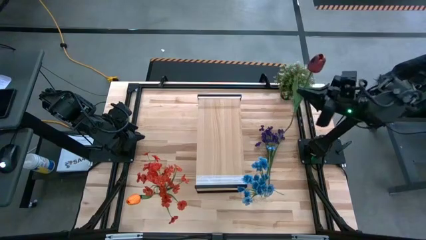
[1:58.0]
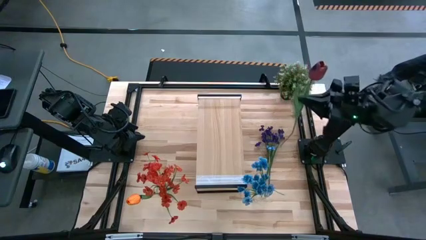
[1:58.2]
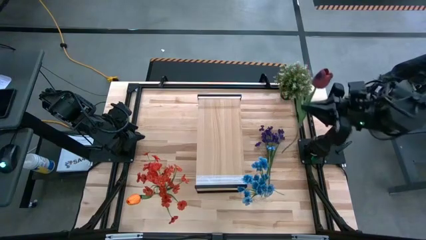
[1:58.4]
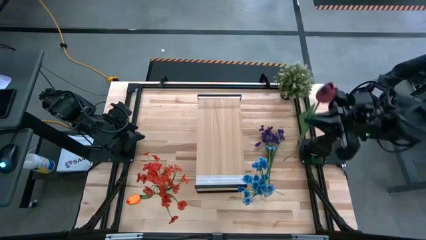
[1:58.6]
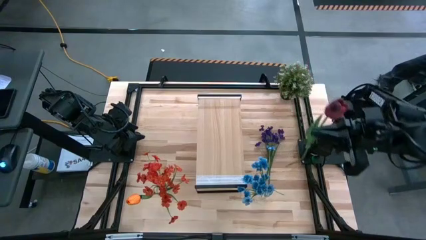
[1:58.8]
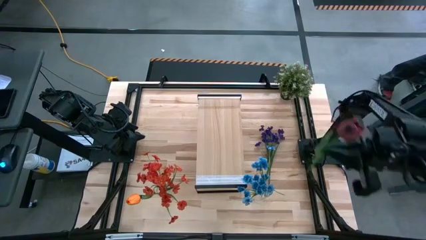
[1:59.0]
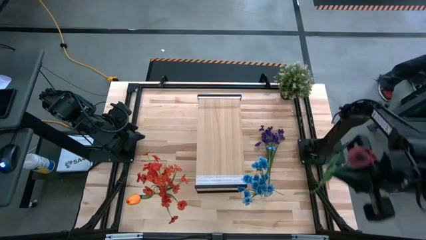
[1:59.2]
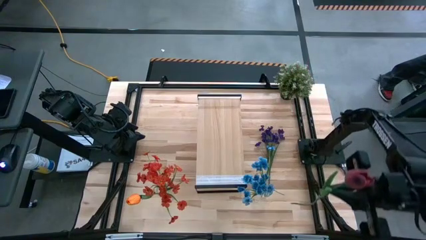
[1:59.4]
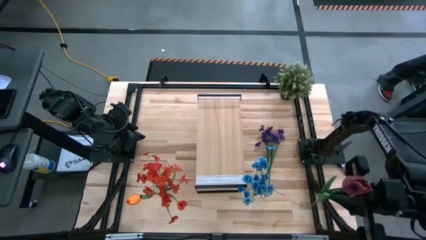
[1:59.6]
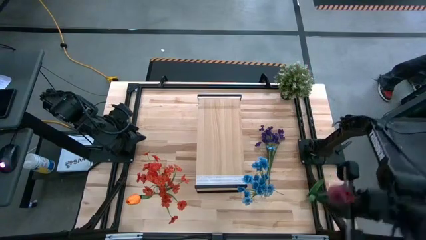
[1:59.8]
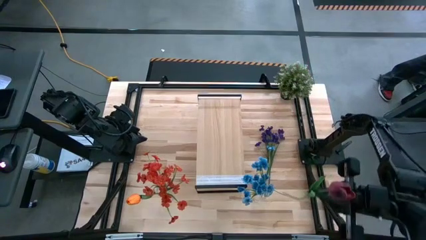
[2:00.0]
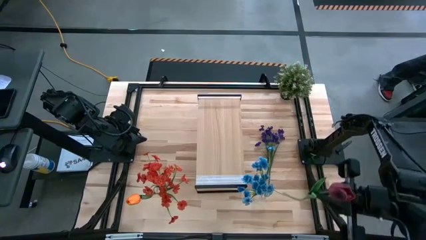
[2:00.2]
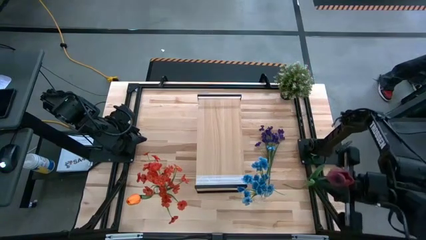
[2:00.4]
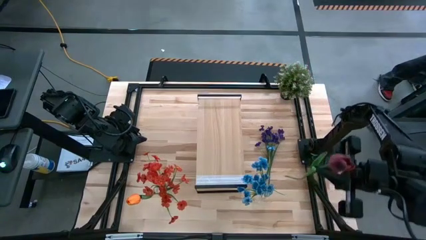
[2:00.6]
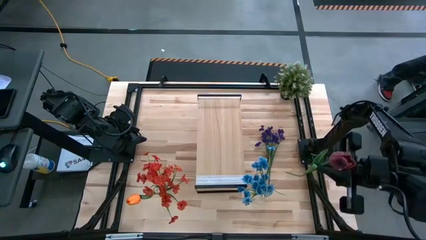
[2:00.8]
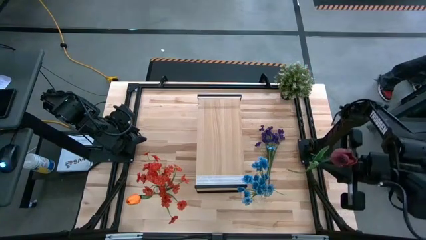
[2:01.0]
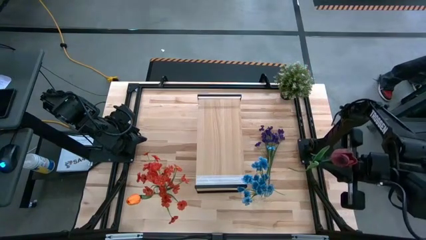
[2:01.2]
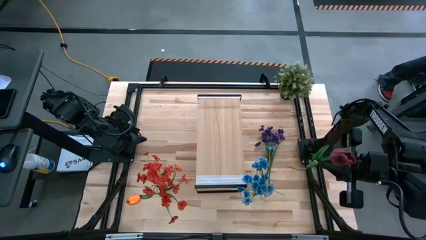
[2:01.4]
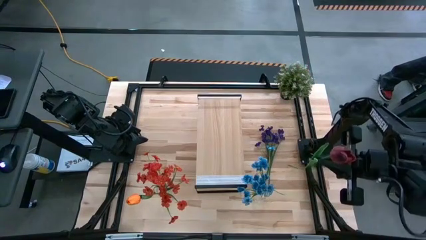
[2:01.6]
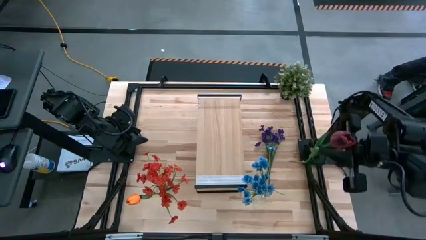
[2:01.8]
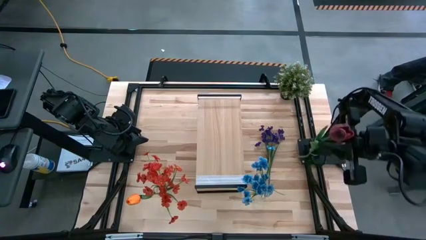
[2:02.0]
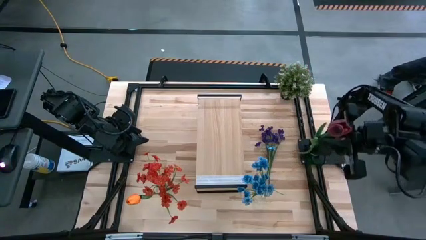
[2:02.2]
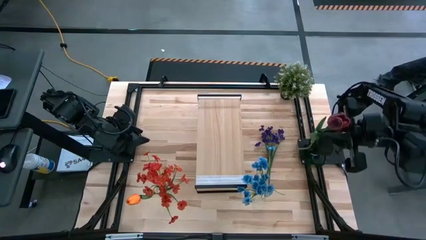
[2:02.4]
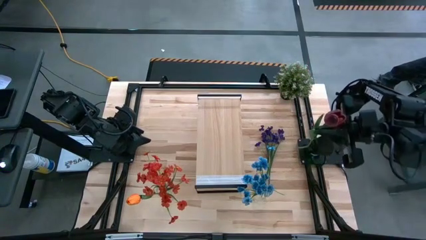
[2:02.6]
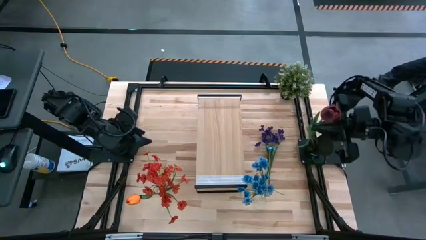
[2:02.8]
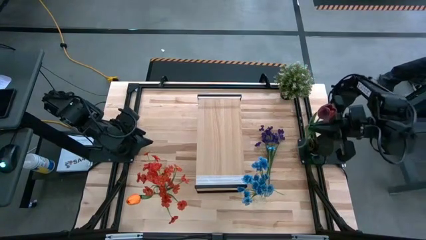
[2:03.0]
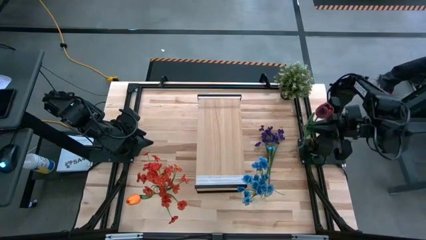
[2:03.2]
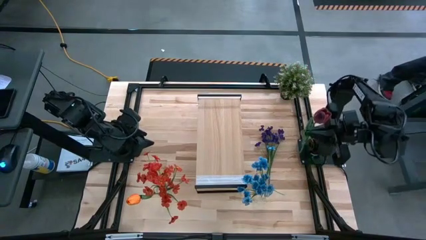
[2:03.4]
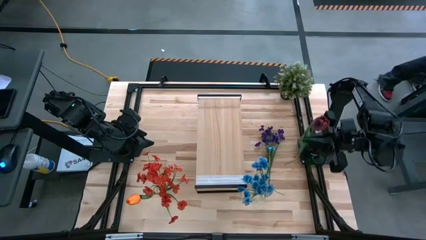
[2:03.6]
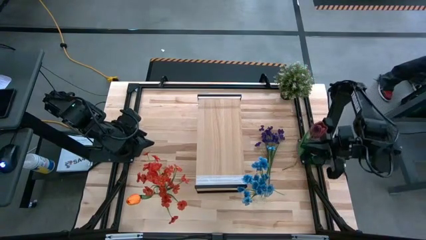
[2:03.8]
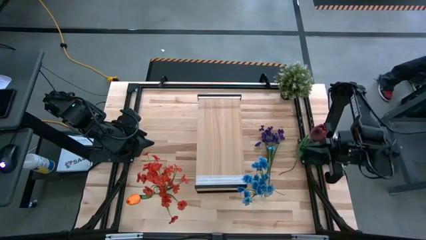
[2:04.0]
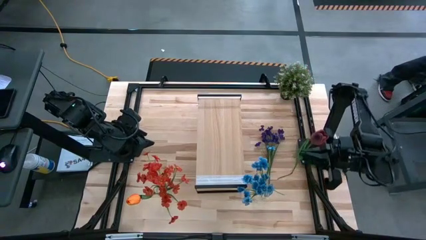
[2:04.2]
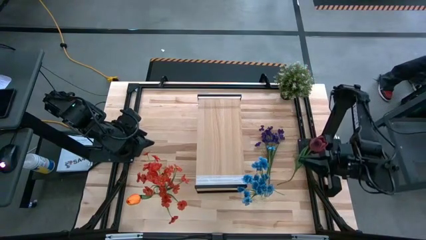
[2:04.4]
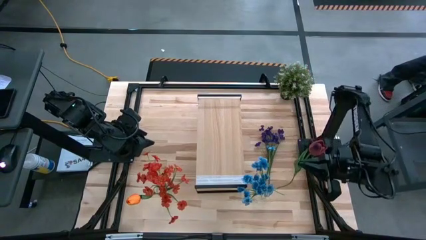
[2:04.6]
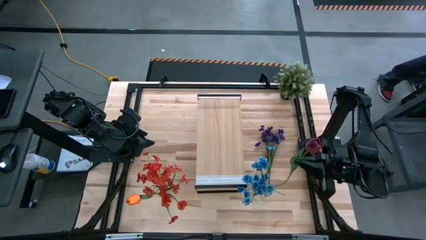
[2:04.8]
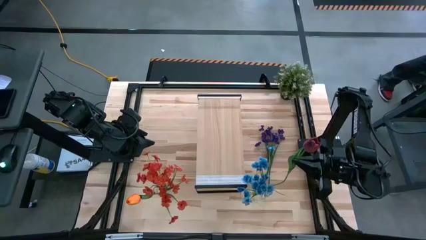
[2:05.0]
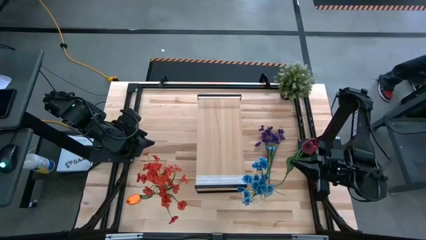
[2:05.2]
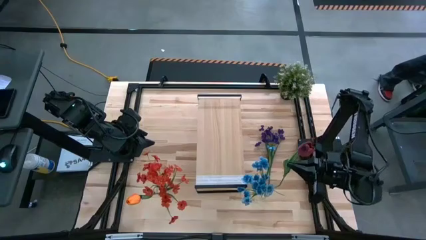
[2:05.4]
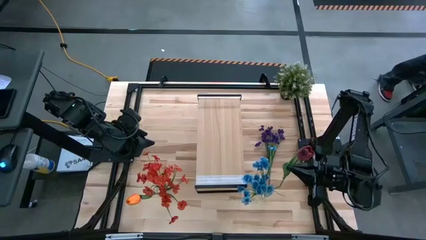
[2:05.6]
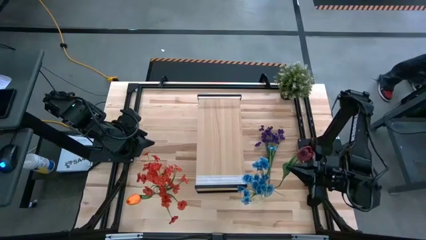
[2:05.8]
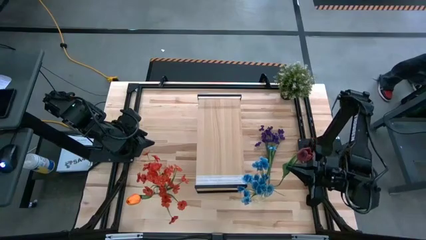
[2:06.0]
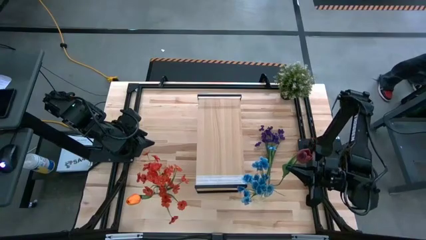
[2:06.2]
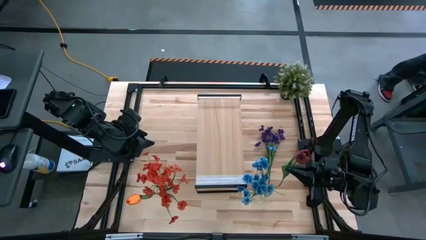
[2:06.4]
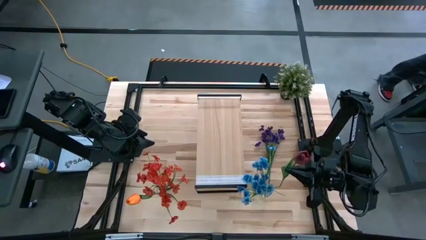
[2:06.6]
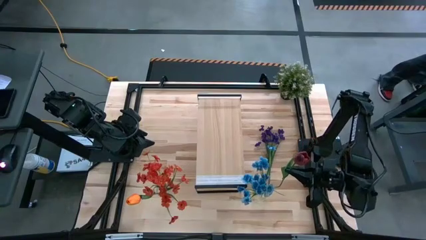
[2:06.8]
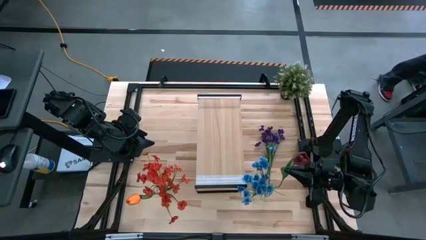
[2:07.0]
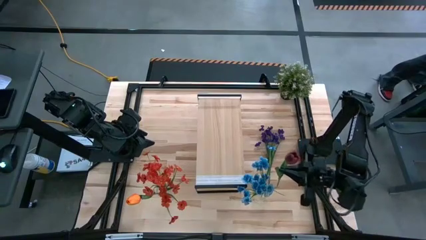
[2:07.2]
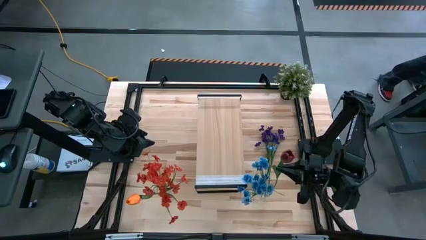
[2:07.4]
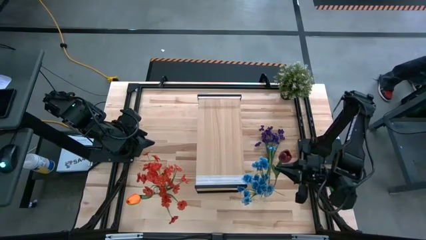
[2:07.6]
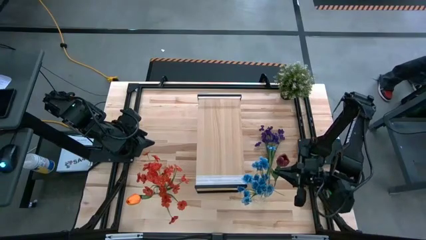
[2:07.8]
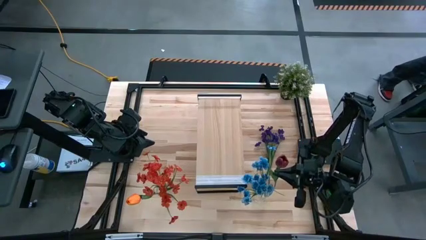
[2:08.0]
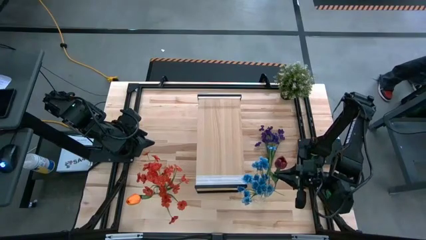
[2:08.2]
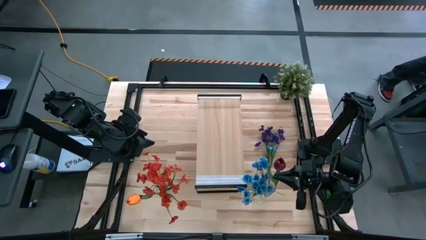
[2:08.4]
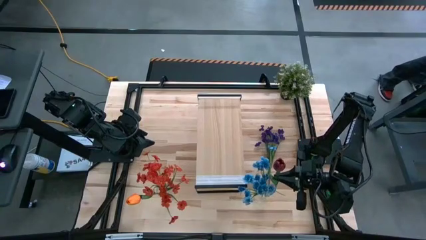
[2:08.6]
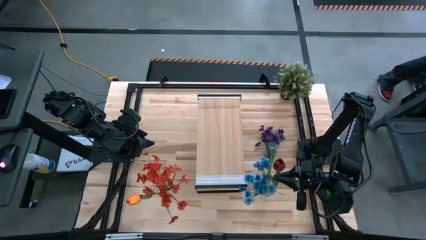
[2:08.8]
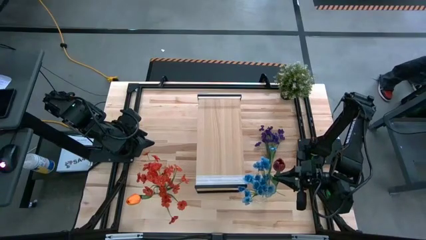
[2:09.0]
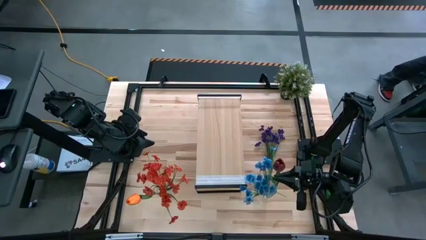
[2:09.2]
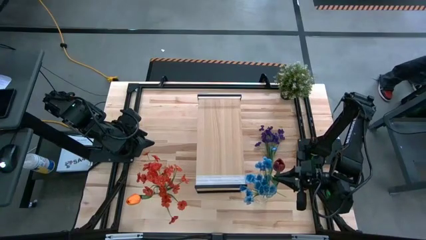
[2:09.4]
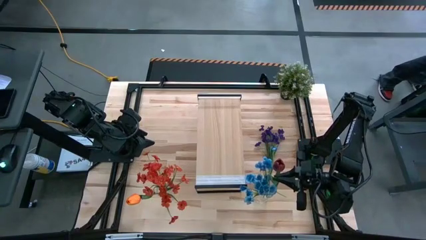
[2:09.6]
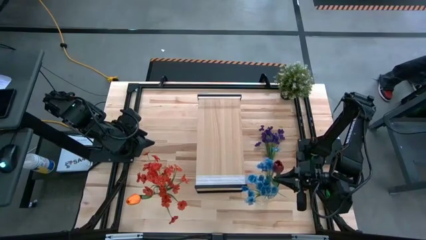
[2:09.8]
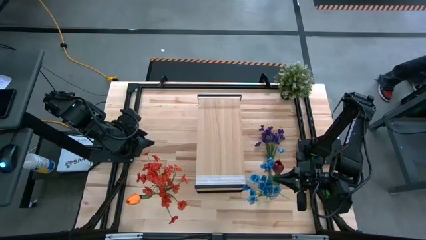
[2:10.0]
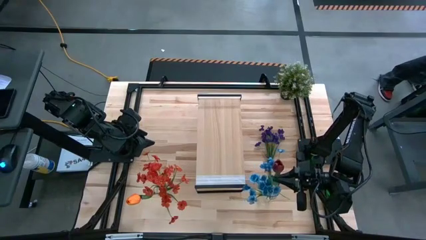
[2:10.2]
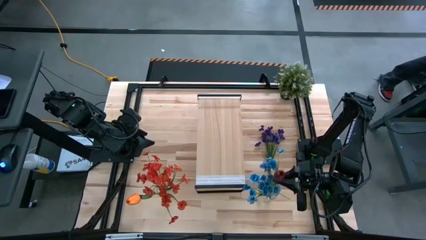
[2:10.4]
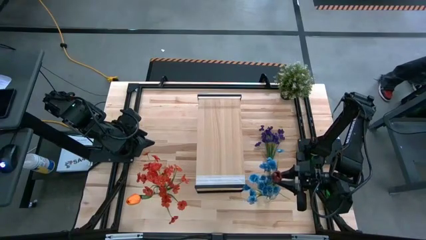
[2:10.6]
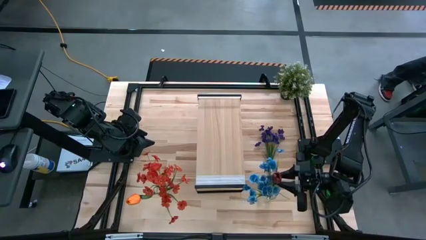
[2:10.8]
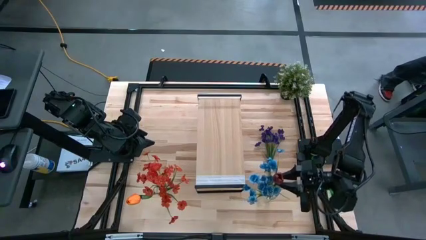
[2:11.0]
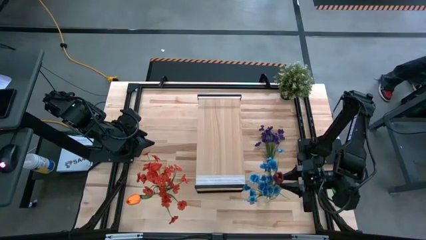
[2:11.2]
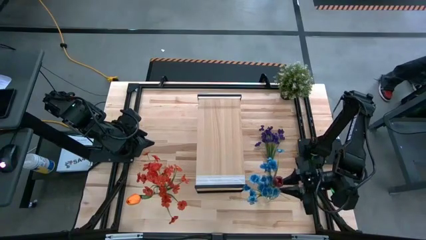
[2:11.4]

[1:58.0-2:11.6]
Task: Pick and place flowers into a vace then onto a shelf
Put the red flower into the right transparent vase

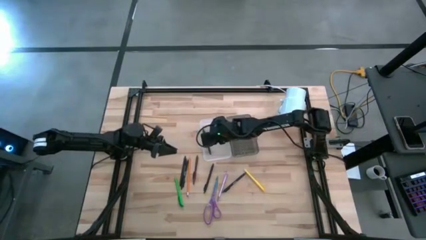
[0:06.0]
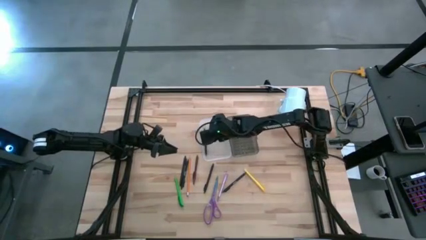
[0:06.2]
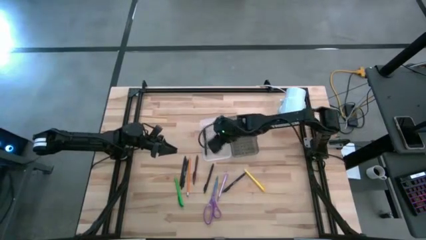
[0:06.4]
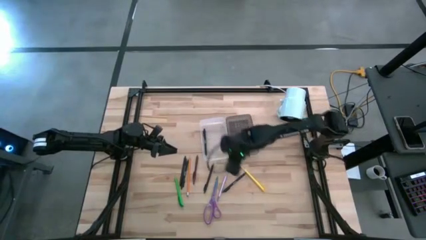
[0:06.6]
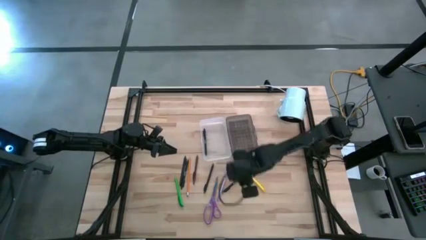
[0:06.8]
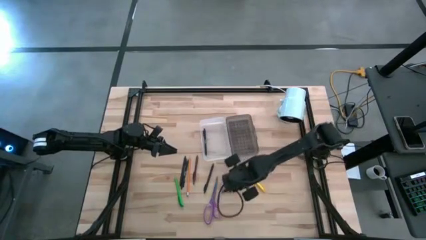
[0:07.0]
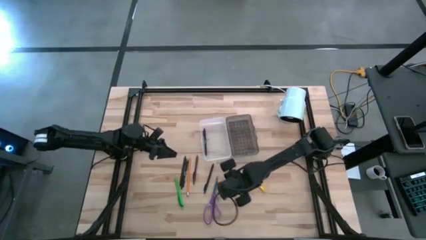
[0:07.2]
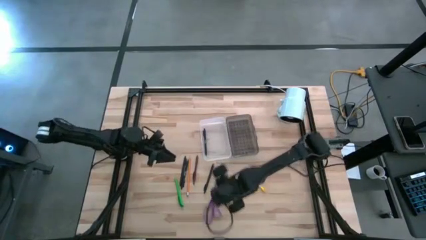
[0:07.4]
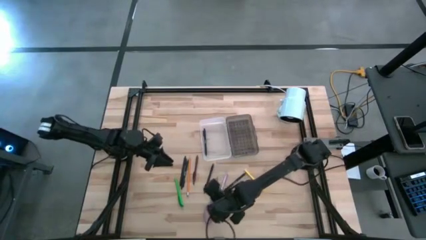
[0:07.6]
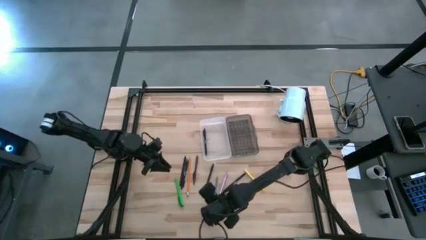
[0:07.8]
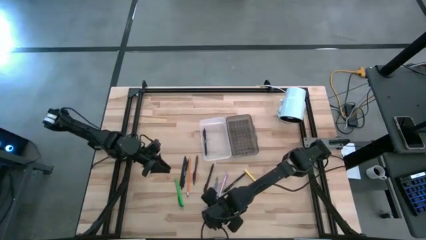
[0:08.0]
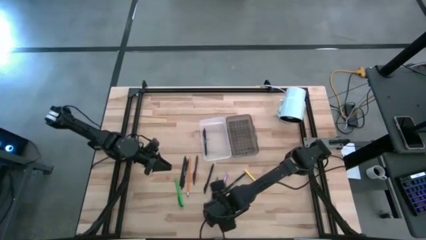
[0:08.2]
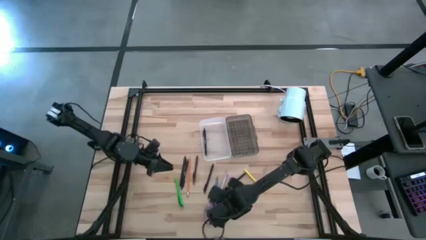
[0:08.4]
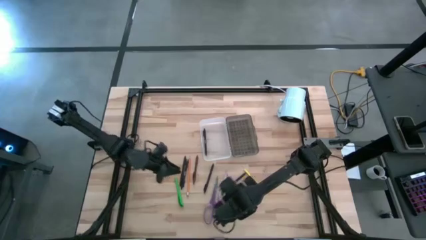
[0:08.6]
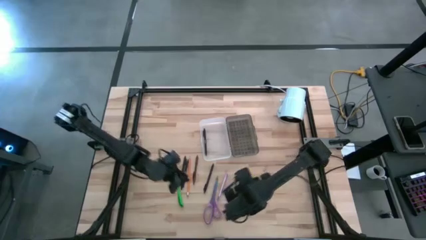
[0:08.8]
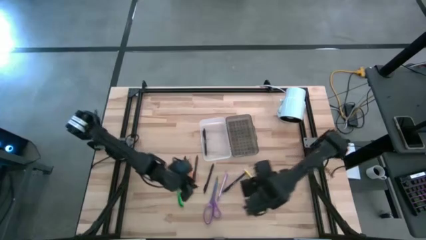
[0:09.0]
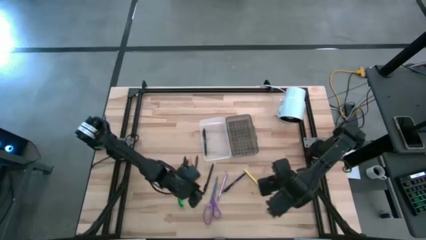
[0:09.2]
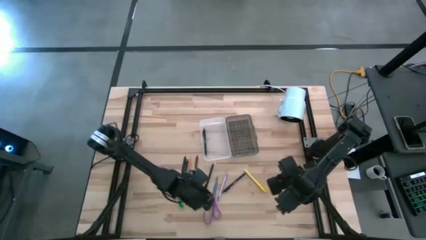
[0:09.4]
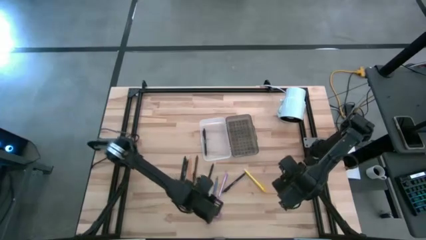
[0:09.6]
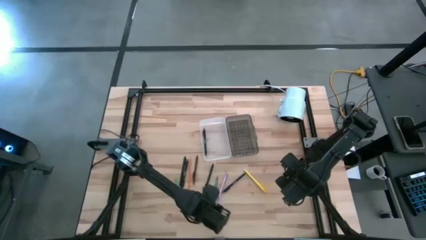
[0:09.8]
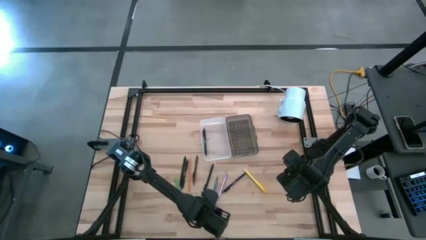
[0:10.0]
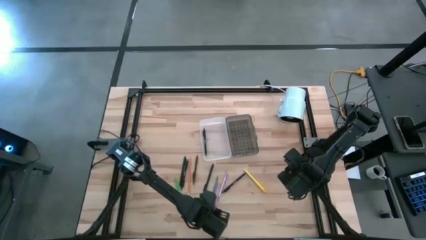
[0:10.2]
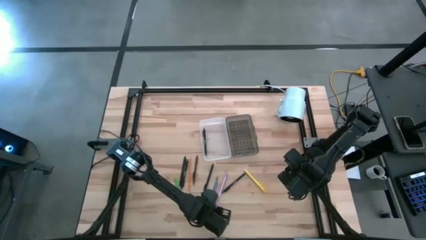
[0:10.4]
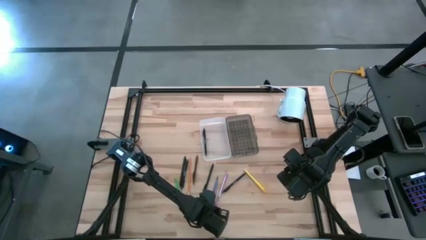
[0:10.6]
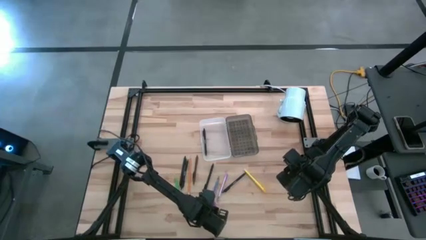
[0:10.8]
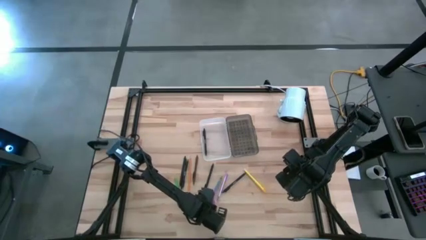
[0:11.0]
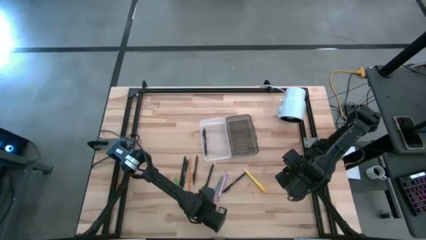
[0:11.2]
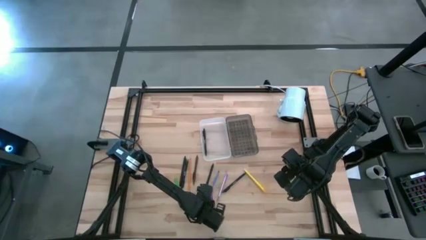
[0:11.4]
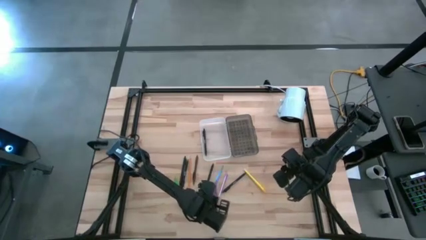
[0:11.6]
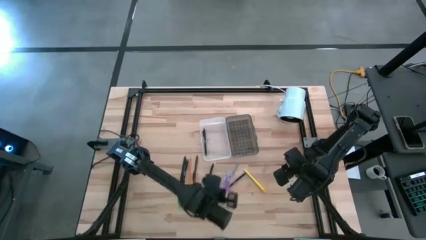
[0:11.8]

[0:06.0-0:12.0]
Task: Pick & place school supplies into a supply box
Put the violet scissor into the supply box
